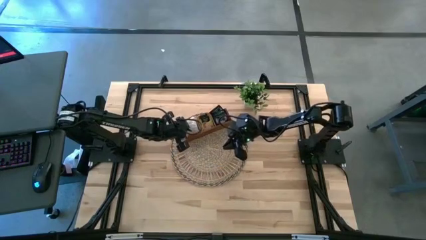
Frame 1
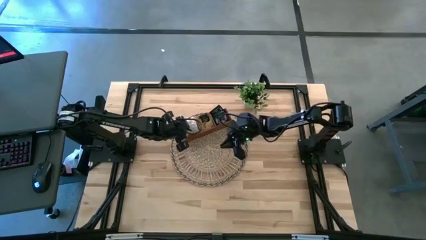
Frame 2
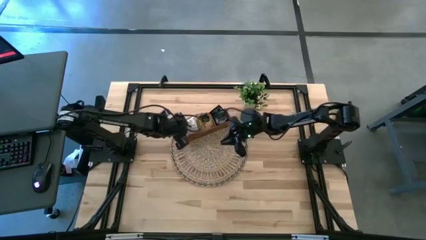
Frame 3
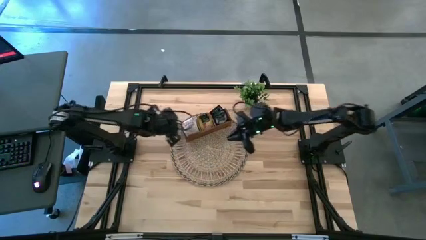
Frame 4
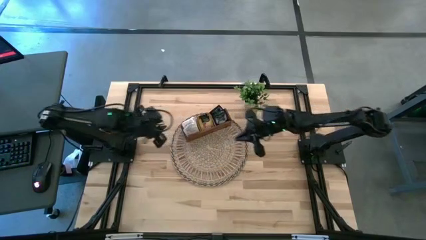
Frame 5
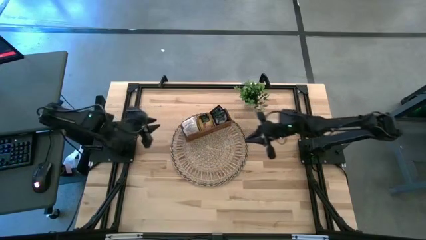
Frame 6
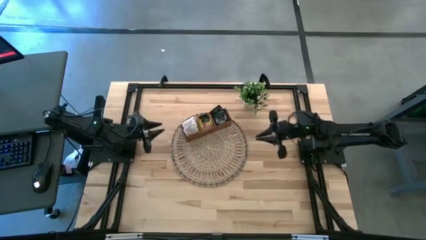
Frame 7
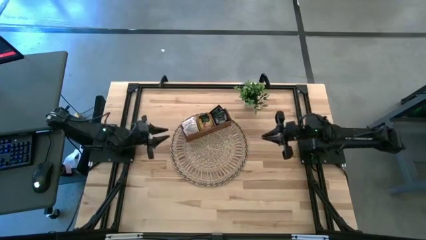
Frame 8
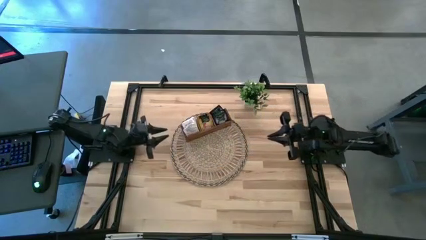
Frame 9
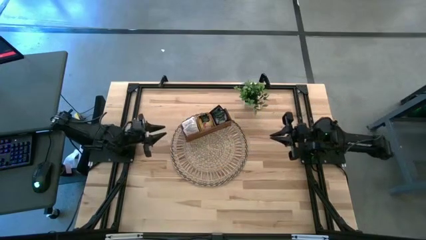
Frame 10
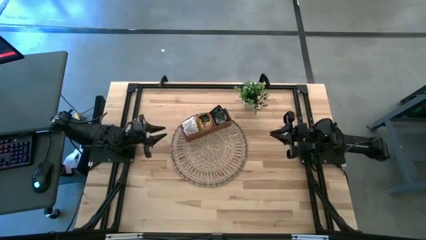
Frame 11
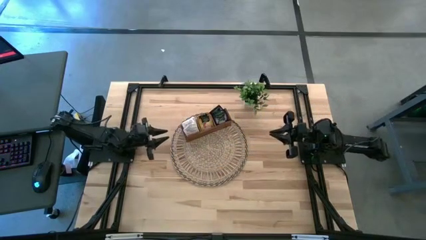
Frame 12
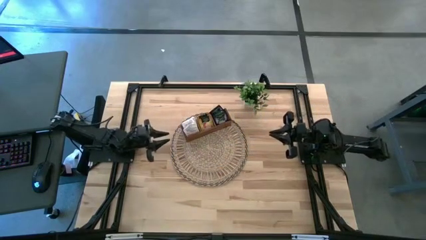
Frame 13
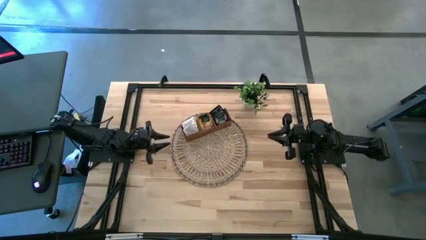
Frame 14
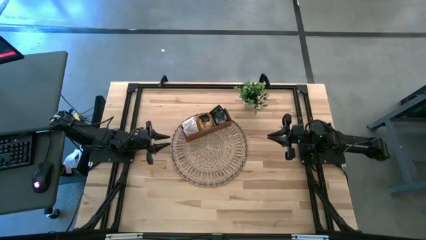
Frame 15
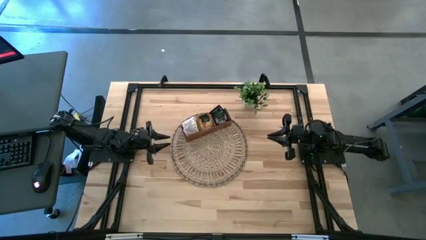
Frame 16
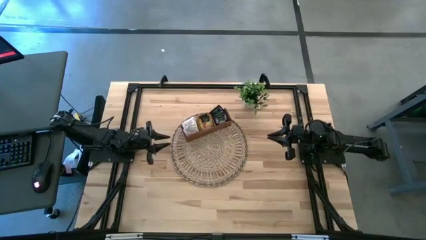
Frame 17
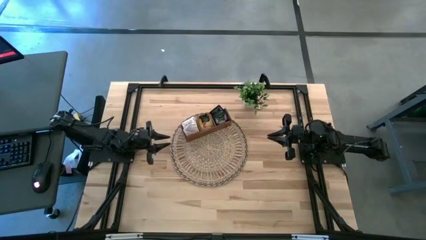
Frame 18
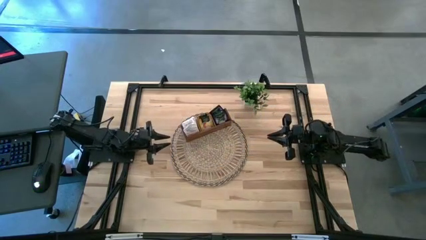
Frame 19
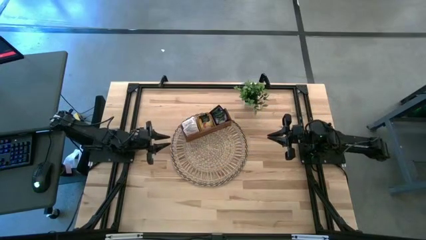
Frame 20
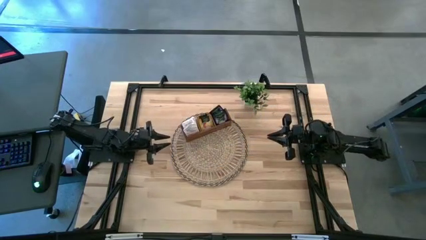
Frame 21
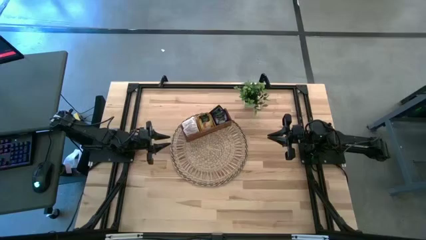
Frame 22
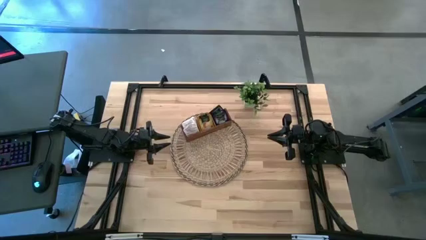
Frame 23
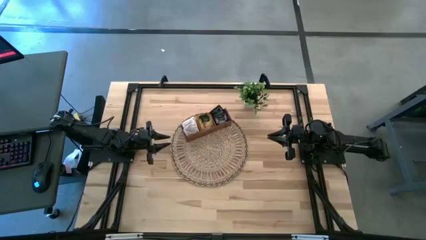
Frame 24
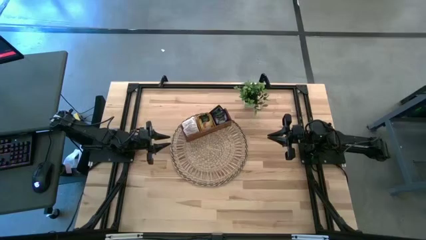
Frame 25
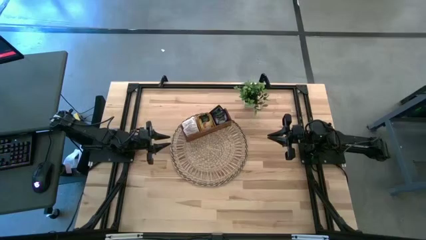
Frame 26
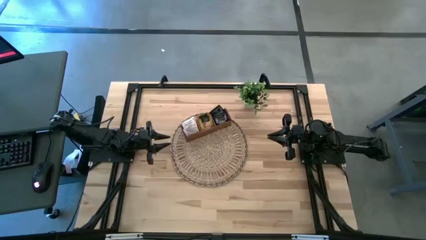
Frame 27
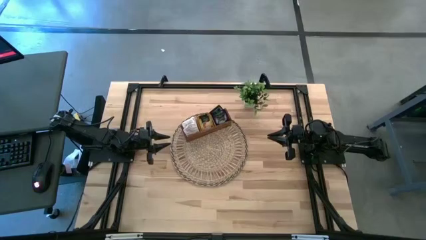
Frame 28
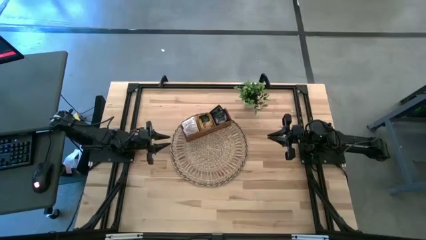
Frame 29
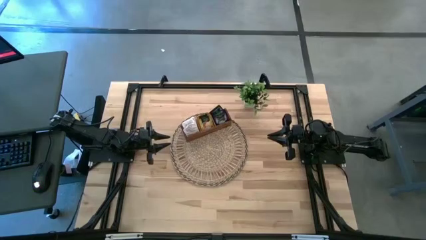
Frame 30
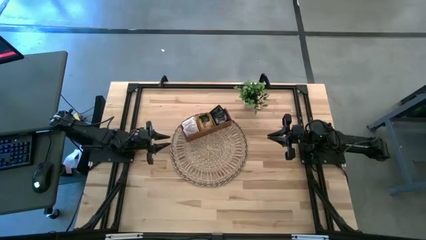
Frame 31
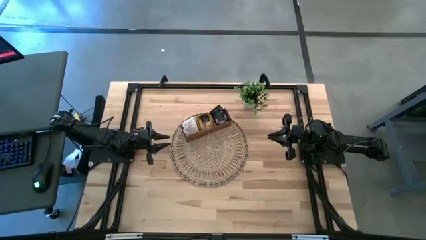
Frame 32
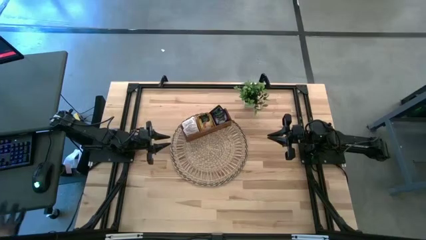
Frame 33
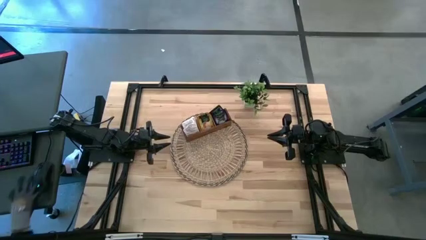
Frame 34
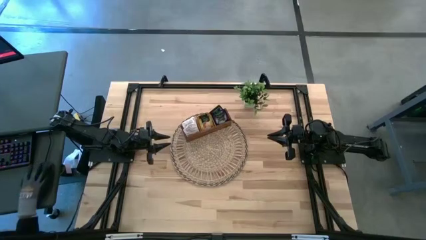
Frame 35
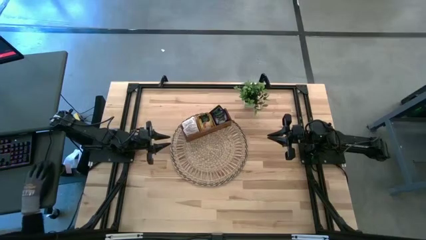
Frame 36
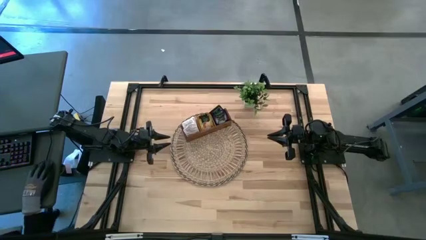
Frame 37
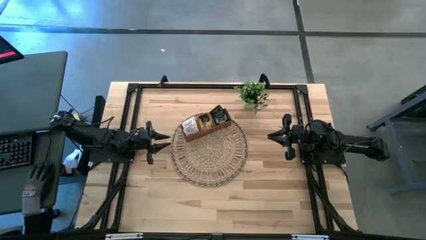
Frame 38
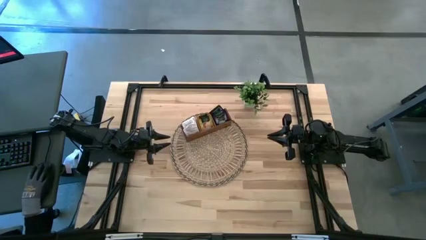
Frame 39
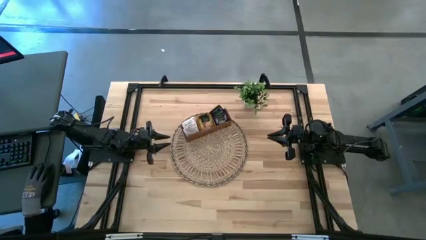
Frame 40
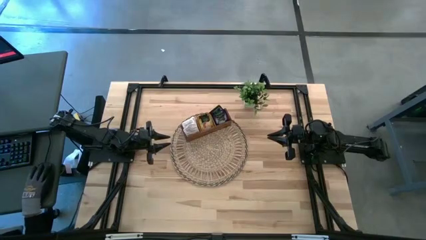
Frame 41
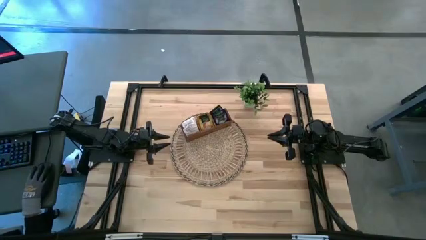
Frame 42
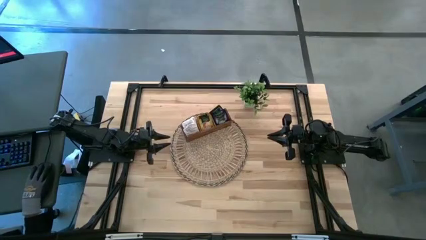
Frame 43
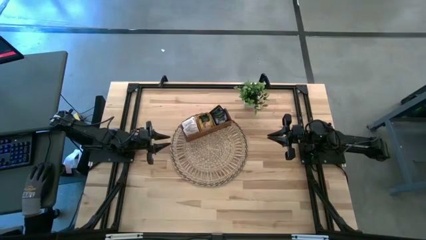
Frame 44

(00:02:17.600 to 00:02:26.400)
Task: Pick & Place Tea
Return to Home Position

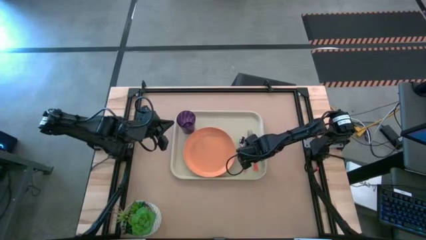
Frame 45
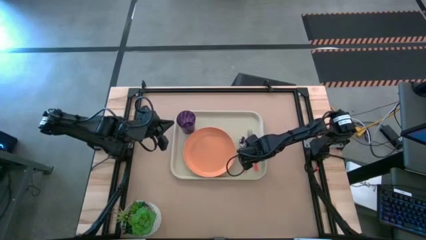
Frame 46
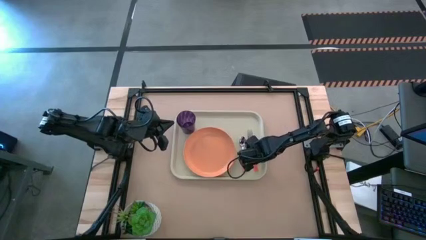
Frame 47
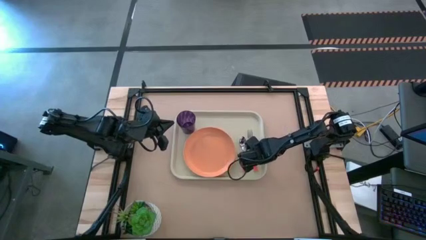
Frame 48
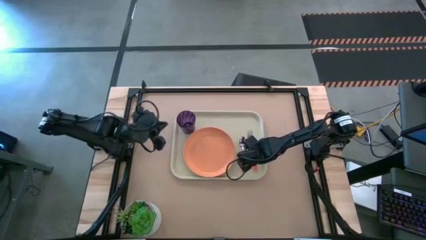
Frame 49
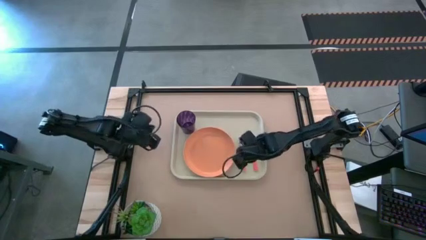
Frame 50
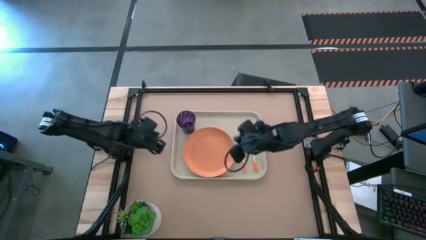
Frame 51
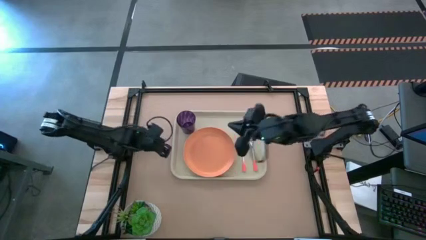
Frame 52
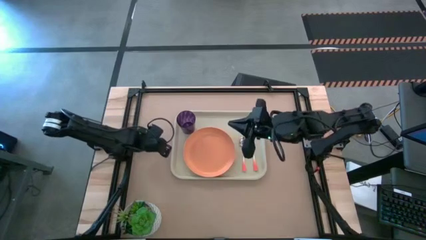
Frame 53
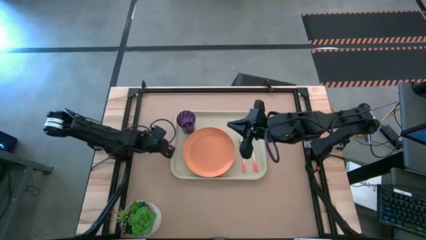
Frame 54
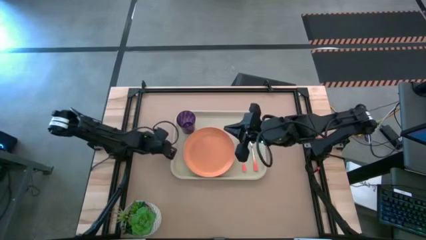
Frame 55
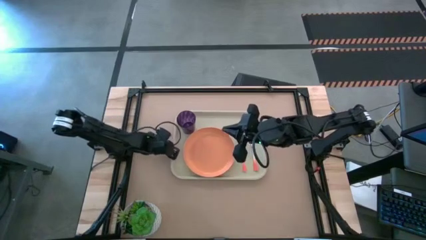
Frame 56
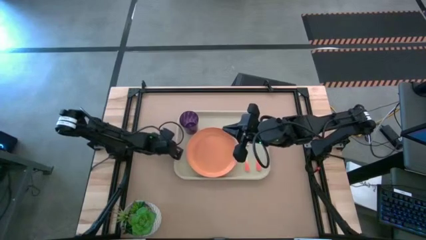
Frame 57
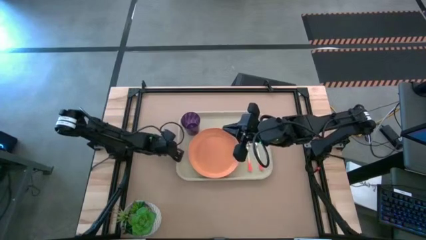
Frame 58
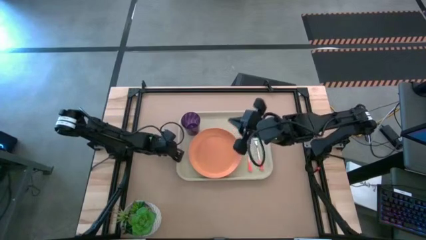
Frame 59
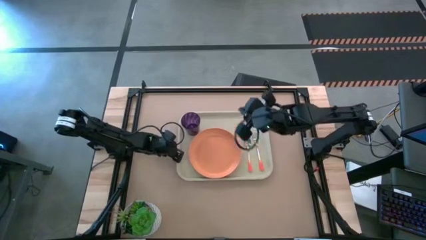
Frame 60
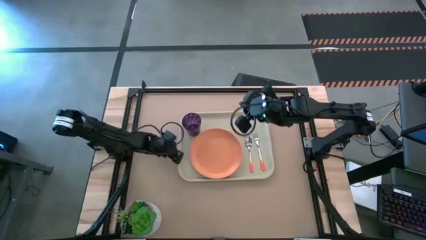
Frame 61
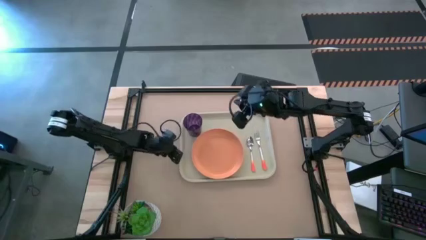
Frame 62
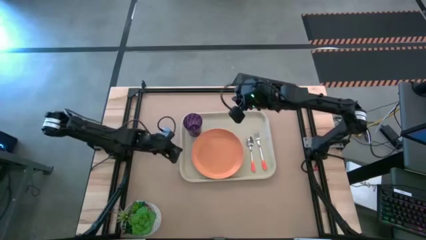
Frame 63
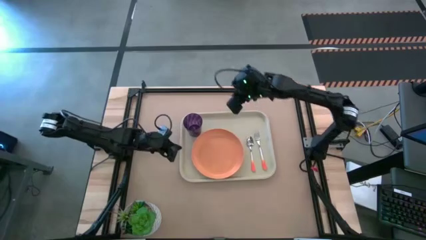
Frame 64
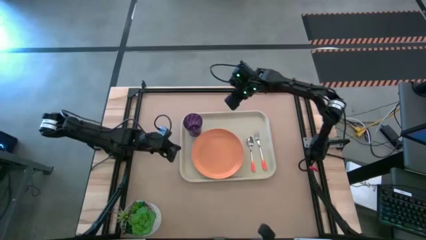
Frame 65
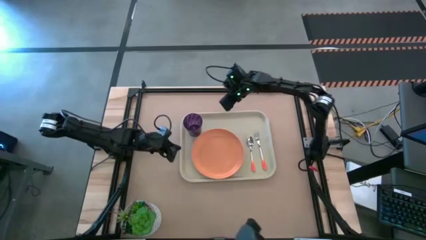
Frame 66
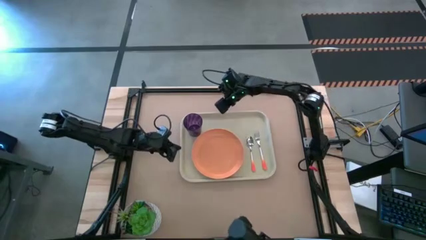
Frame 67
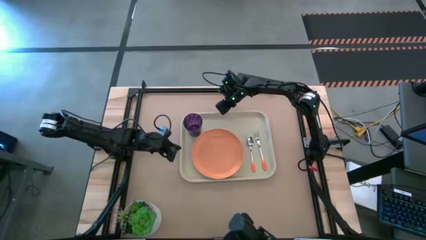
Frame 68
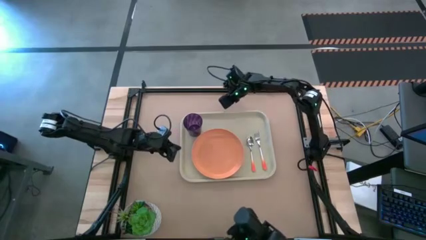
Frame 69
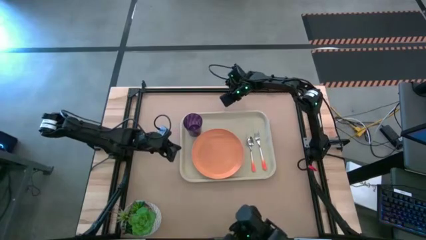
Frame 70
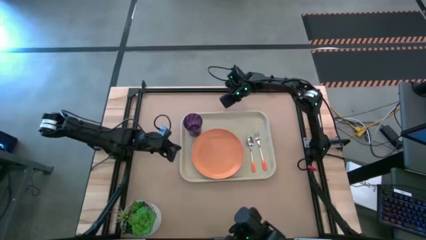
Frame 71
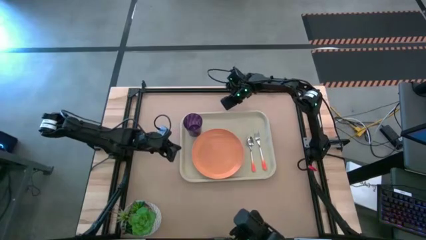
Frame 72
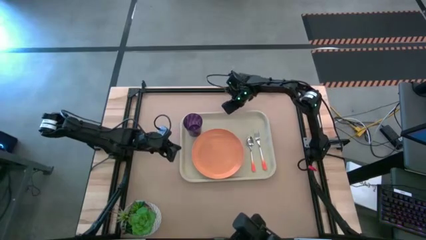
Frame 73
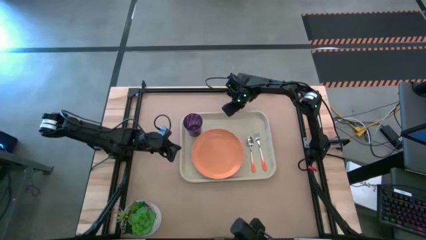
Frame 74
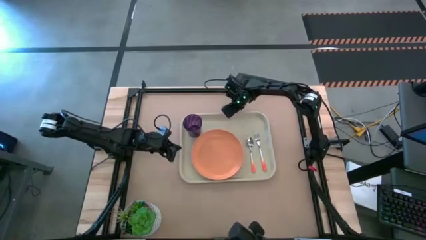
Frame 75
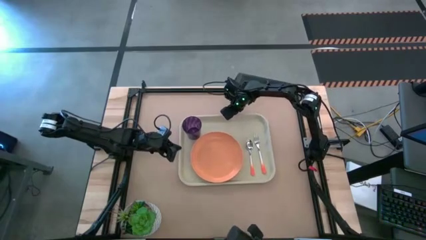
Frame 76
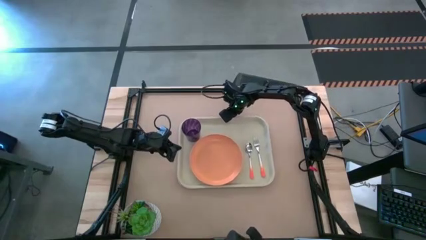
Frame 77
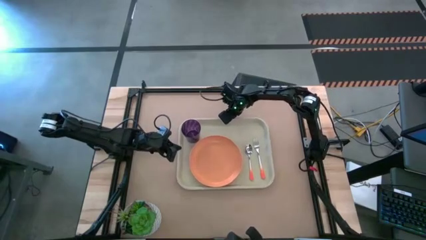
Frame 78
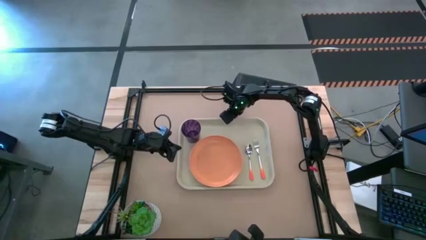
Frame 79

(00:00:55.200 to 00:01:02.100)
Task: Pick and place plate/cup/fork/spoon on tray
Adjust the white tray
